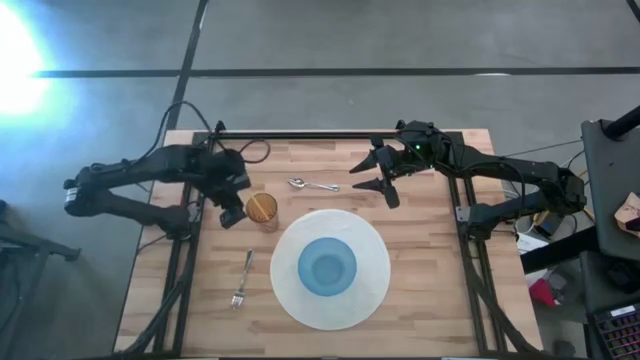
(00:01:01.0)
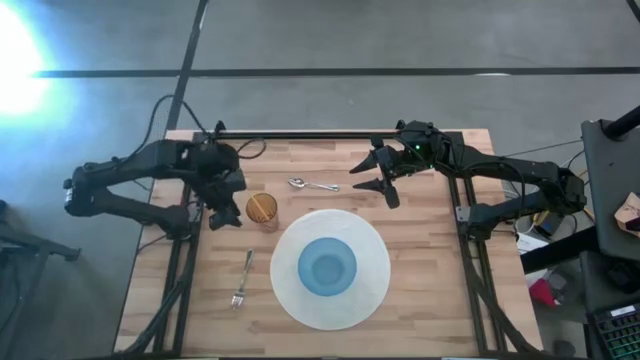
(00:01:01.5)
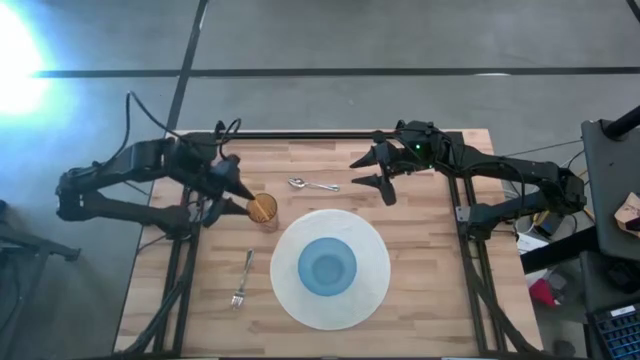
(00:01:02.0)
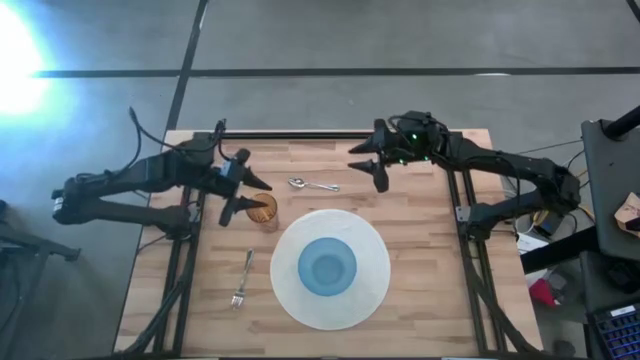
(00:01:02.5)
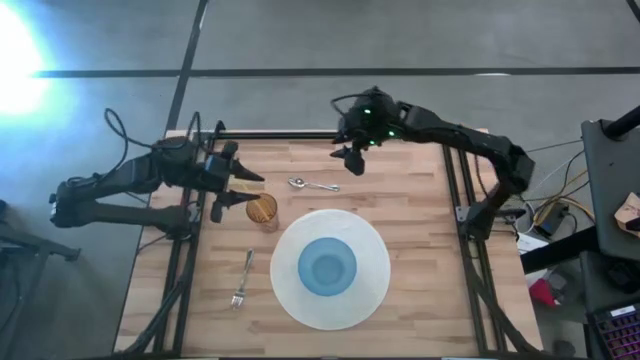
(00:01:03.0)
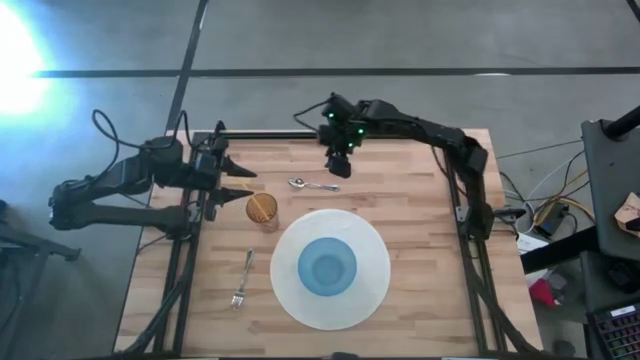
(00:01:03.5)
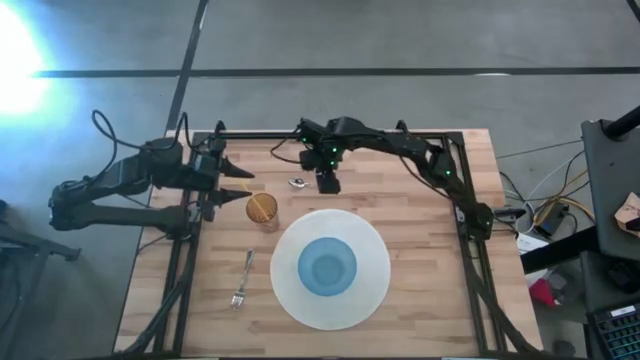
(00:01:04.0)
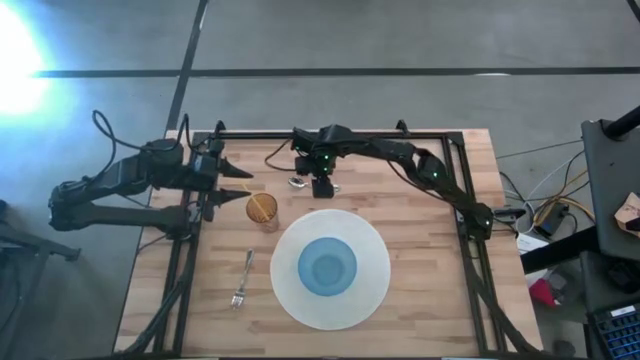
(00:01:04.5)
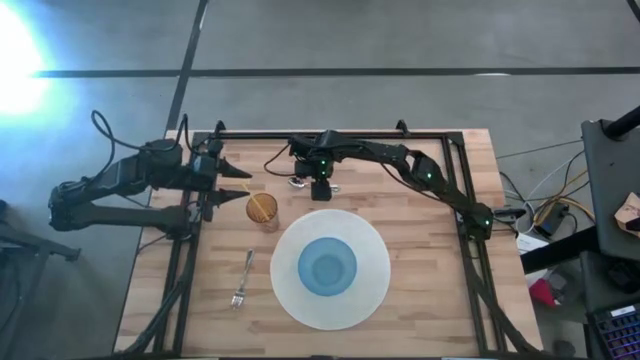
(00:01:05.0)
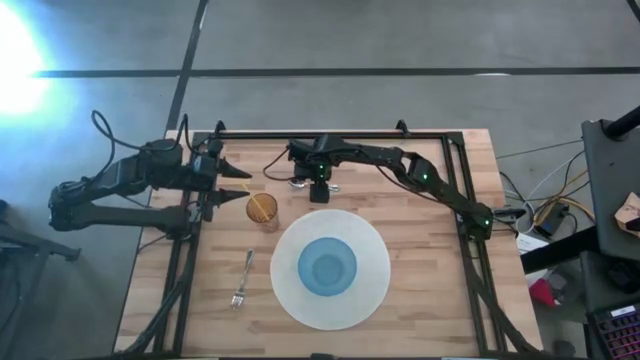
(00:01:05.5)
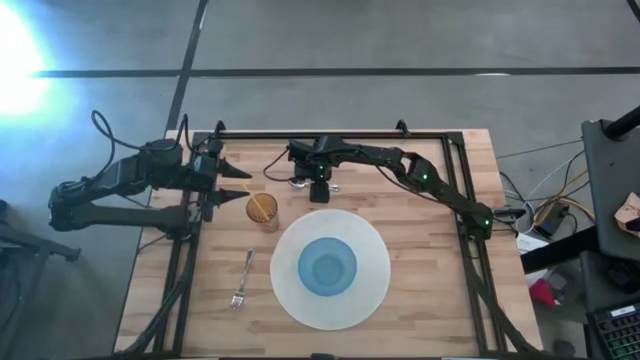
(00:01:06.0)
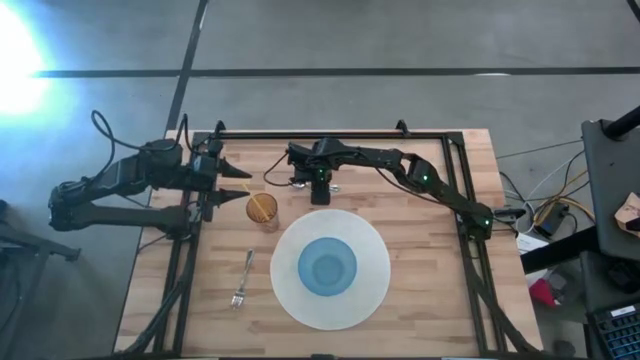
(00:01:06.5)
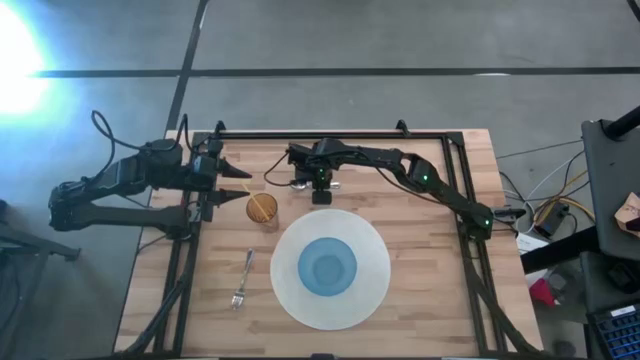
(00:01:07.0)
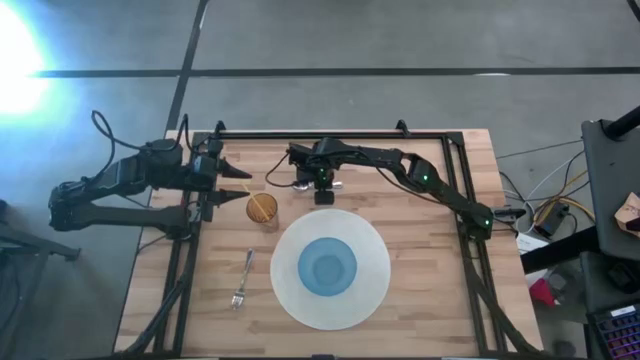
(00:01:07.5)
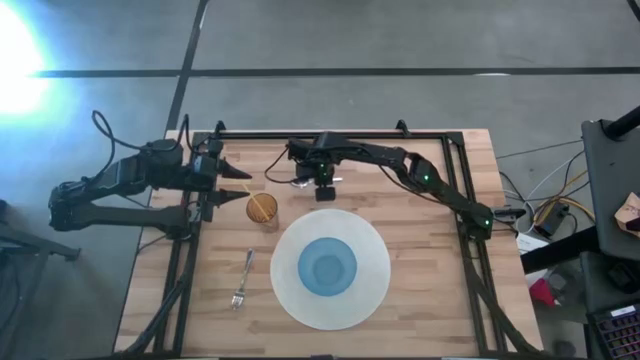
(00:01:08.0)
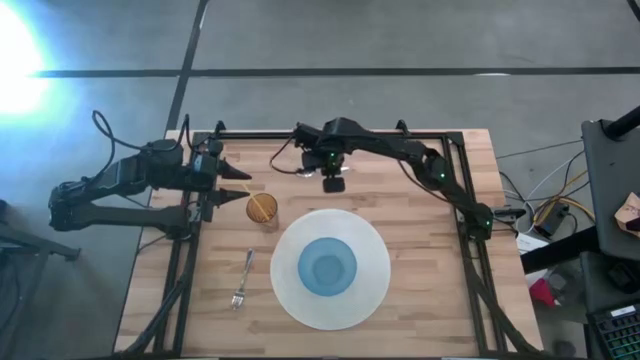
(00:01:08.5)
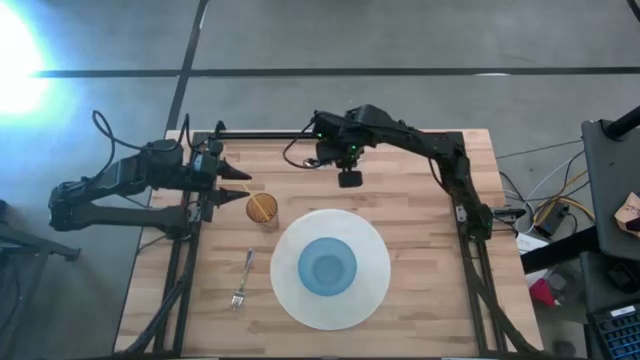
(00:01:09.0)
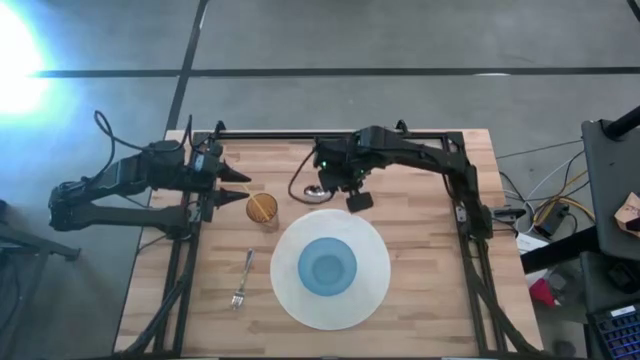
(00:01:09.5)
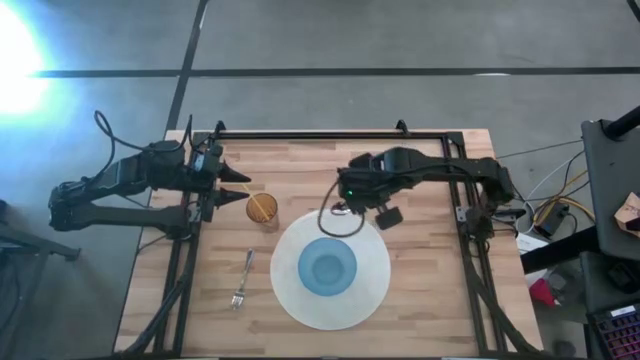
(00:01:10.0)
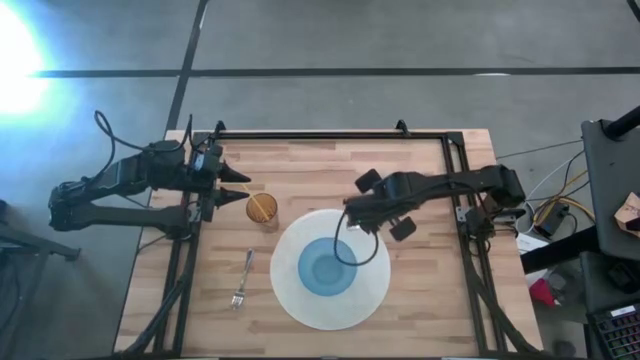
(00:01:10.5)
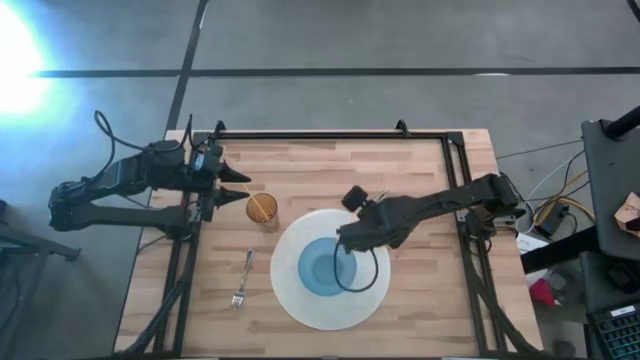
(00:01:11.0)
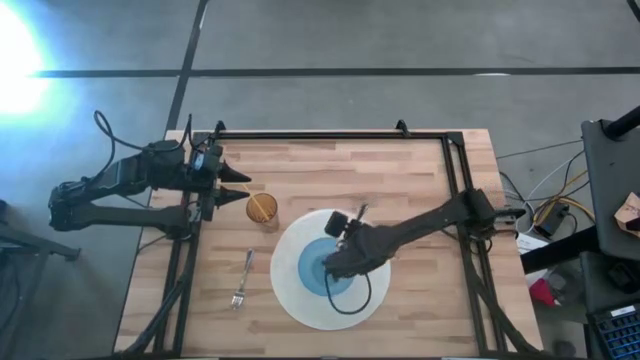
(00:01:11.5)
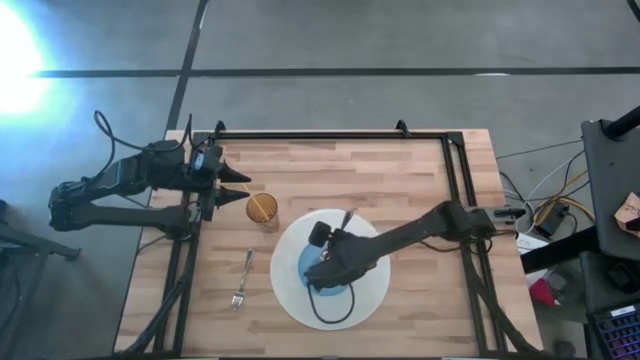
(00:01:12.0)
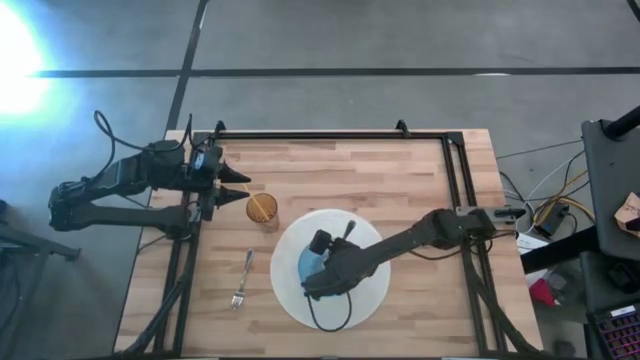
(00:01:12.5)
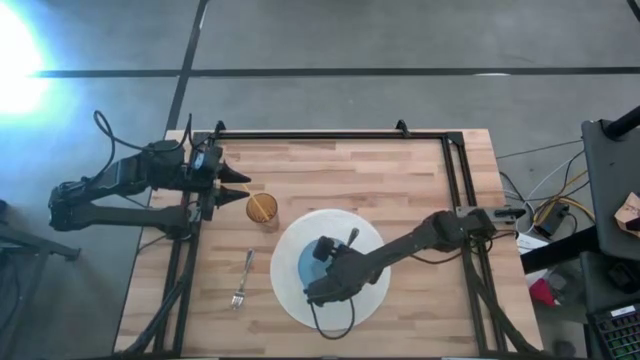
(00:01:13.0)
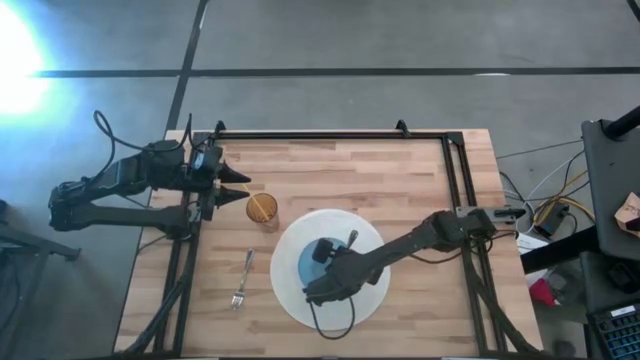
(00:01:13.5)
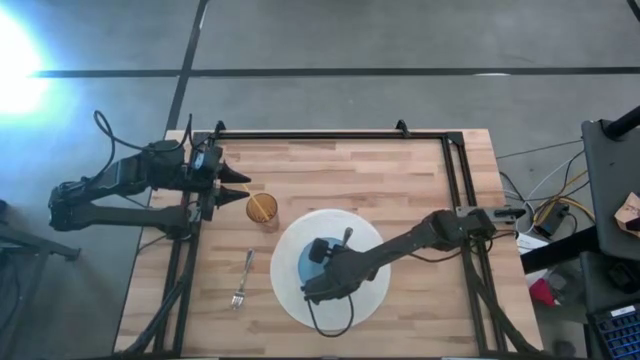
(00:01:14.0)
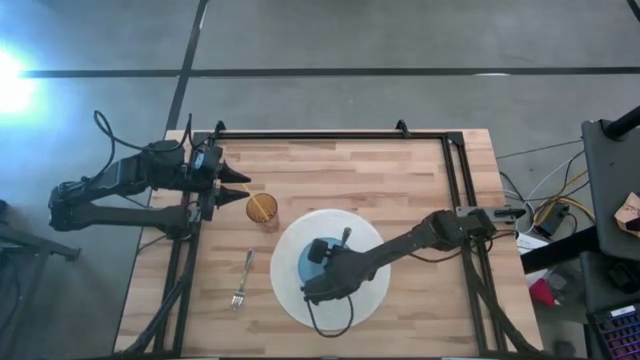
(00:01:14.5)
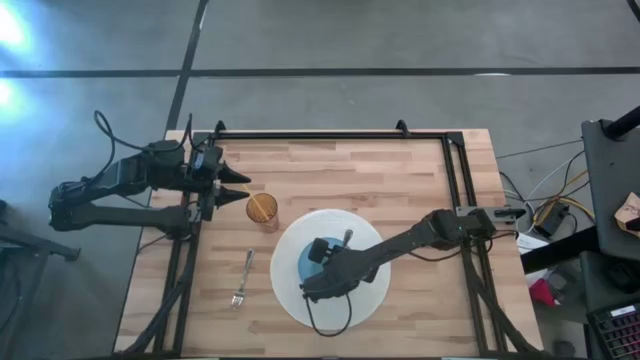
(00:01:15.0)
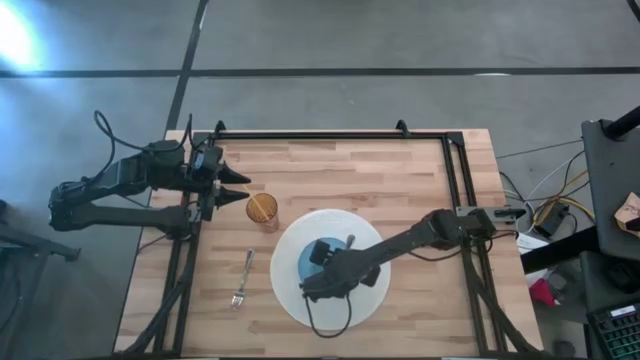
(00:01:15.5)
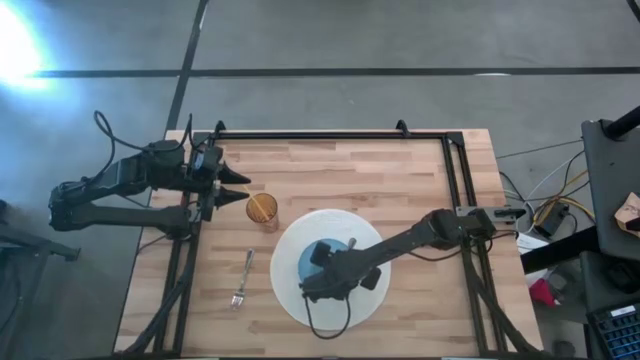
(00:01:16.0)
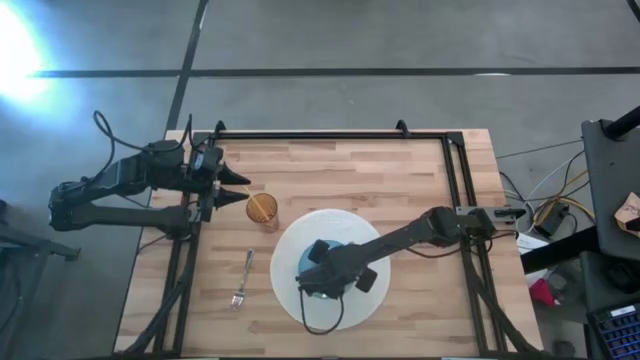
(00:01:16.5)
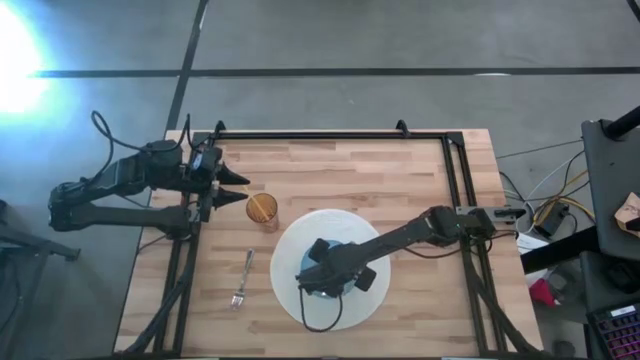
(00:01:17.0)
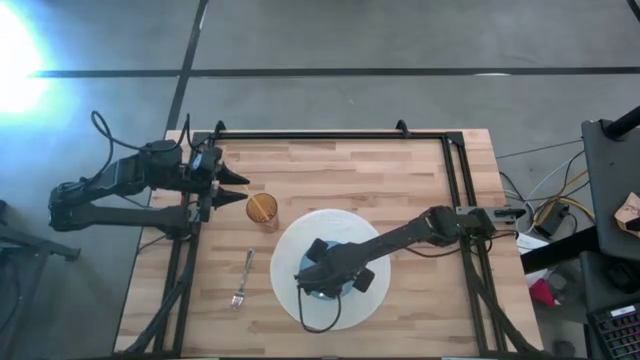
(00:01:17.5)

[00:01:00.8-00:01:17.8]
Task: Pick & Place Utensil
Put the silver spoon into the blue bowl on the white mat
